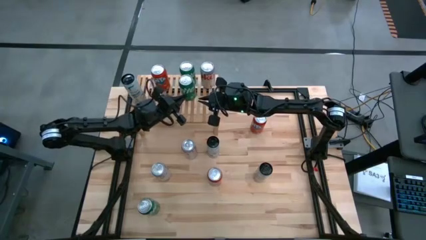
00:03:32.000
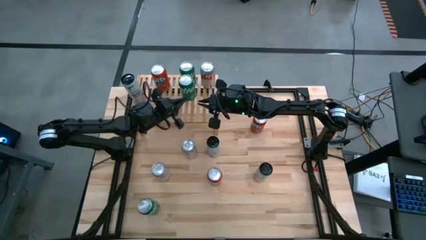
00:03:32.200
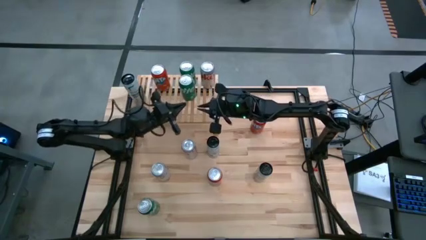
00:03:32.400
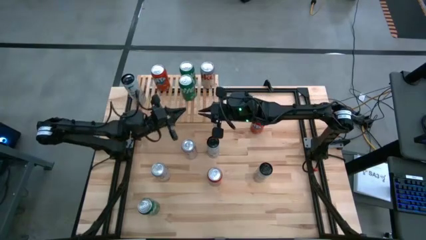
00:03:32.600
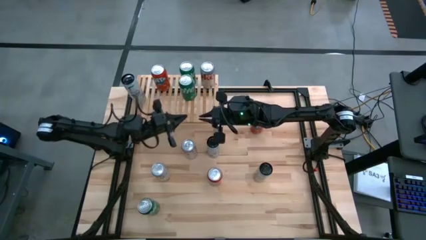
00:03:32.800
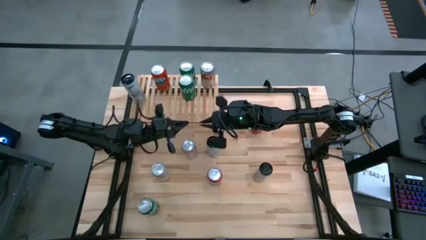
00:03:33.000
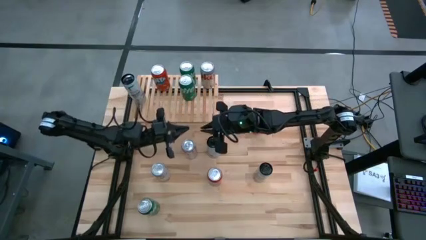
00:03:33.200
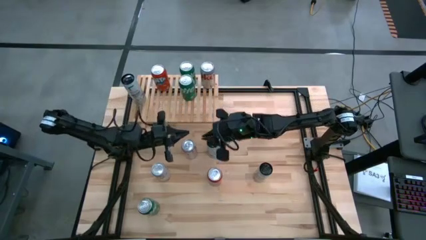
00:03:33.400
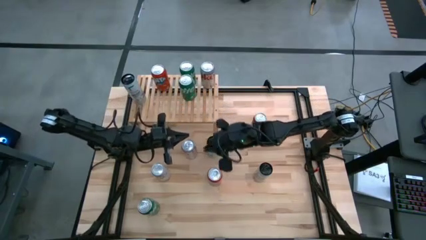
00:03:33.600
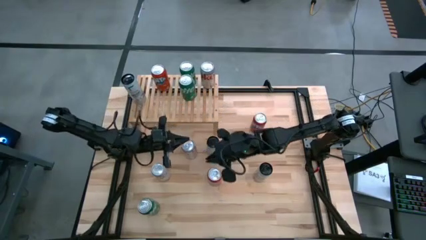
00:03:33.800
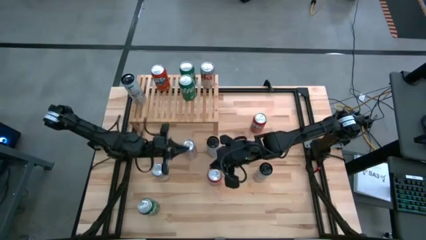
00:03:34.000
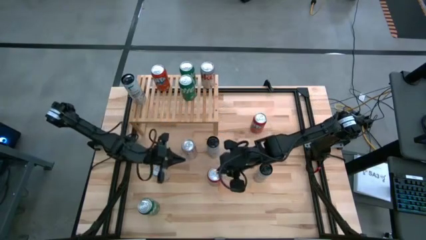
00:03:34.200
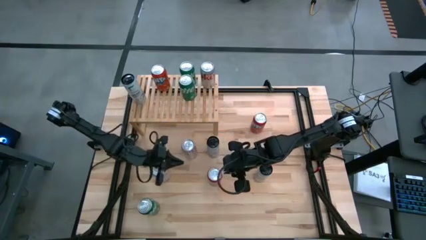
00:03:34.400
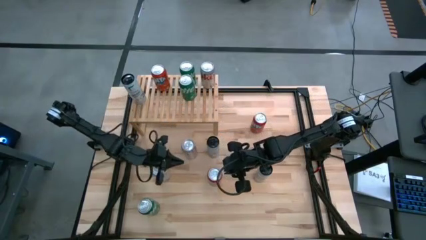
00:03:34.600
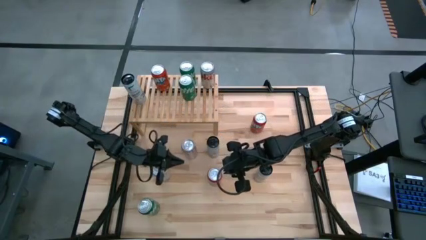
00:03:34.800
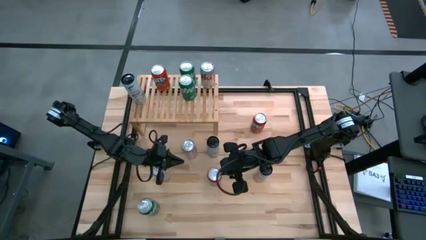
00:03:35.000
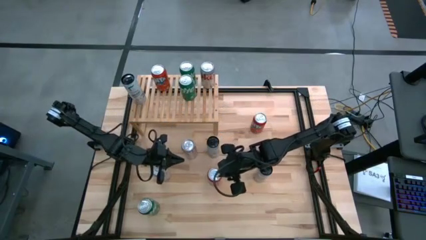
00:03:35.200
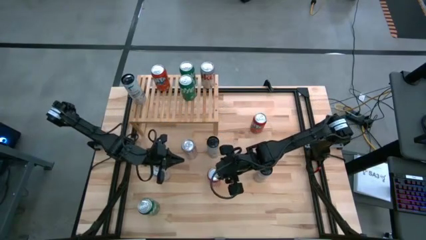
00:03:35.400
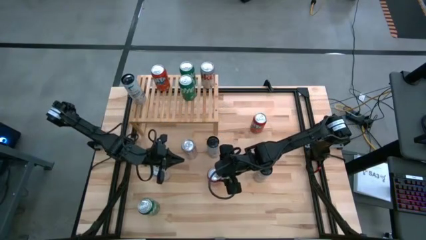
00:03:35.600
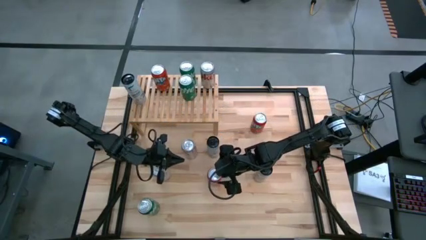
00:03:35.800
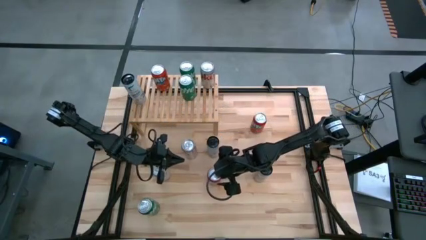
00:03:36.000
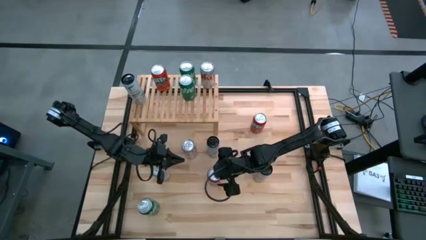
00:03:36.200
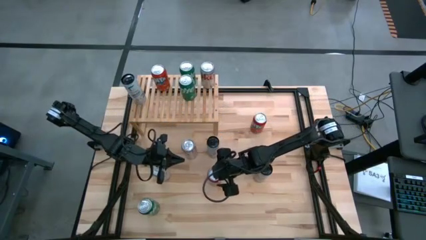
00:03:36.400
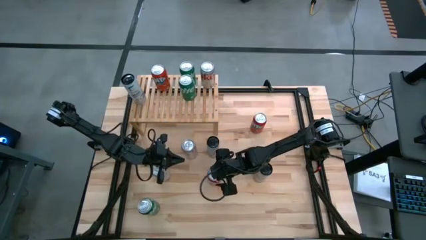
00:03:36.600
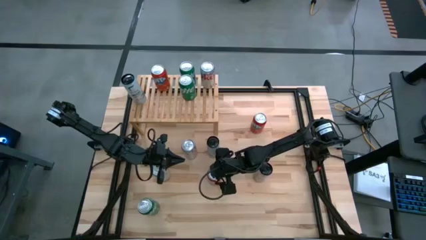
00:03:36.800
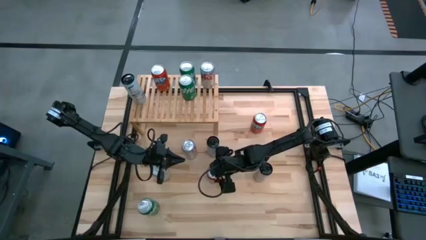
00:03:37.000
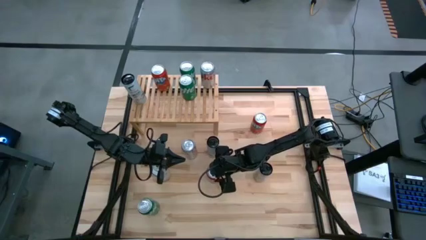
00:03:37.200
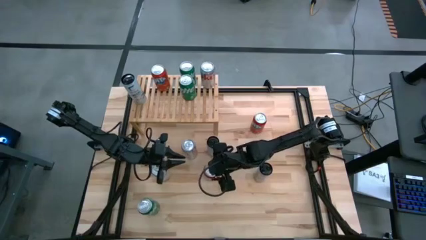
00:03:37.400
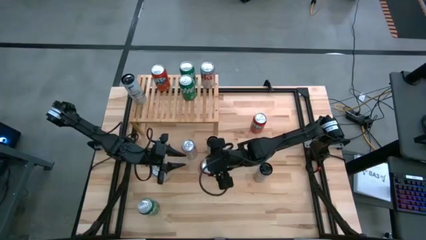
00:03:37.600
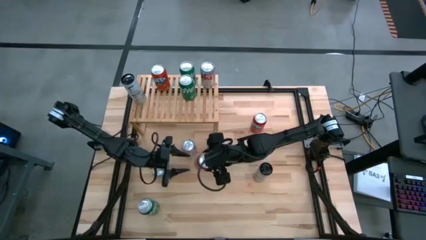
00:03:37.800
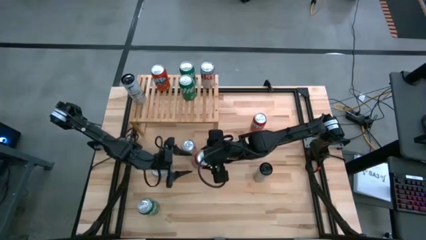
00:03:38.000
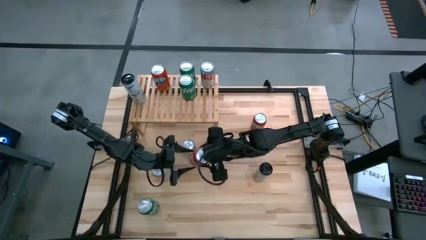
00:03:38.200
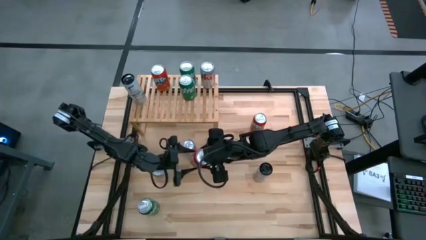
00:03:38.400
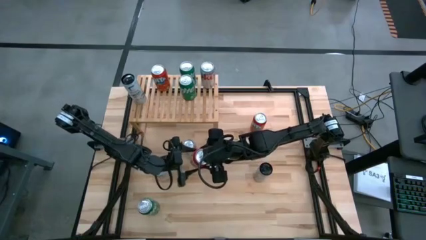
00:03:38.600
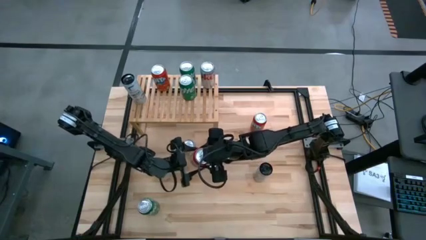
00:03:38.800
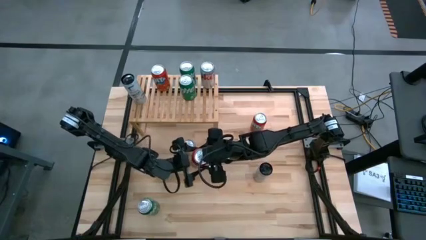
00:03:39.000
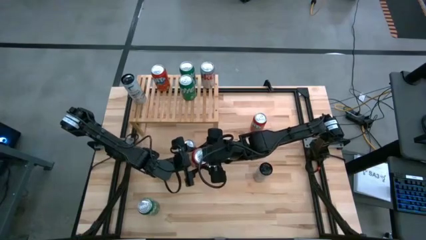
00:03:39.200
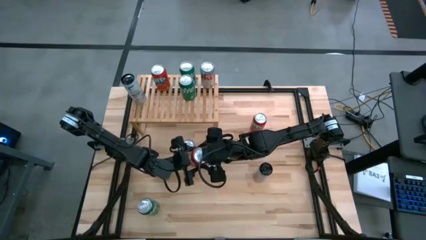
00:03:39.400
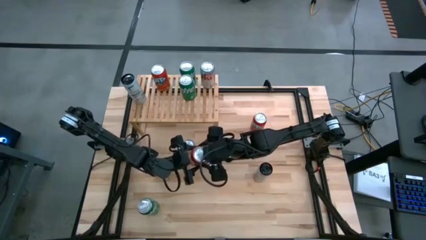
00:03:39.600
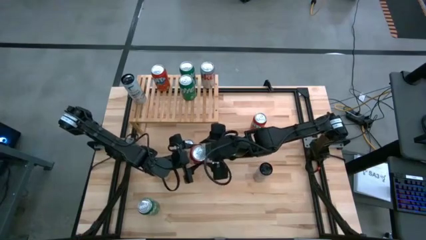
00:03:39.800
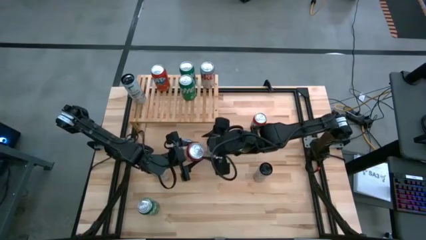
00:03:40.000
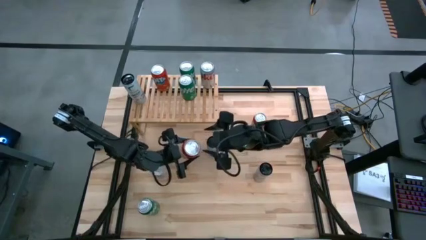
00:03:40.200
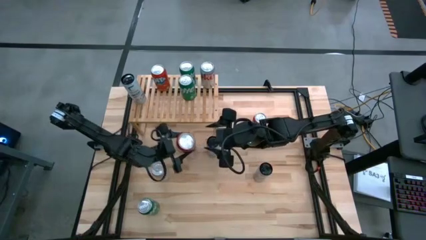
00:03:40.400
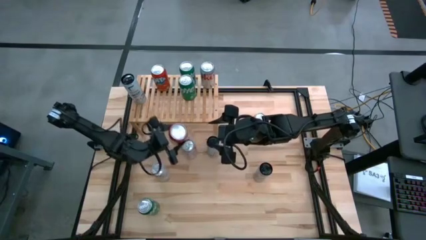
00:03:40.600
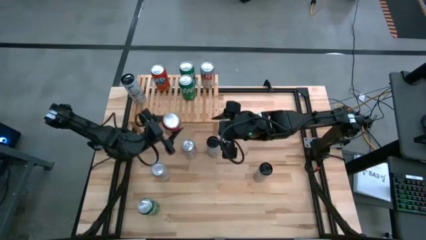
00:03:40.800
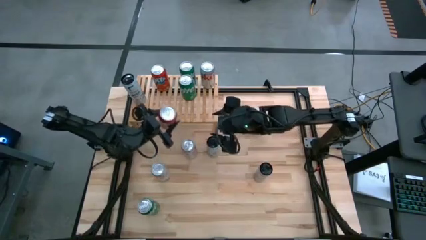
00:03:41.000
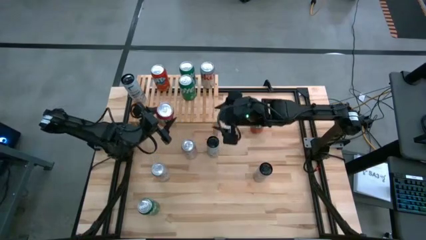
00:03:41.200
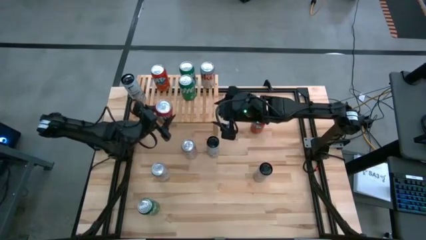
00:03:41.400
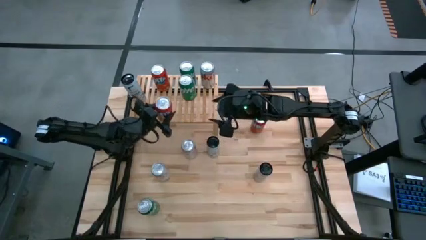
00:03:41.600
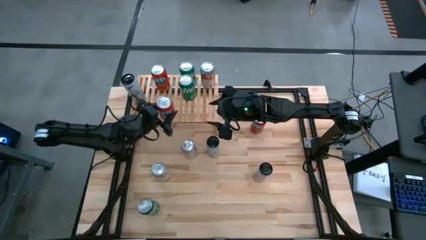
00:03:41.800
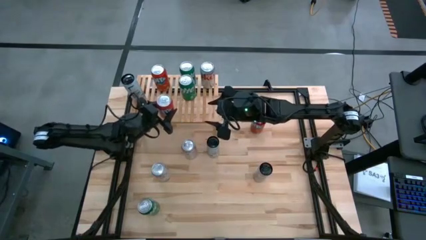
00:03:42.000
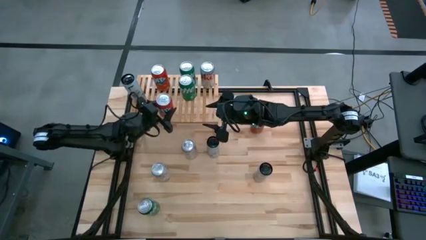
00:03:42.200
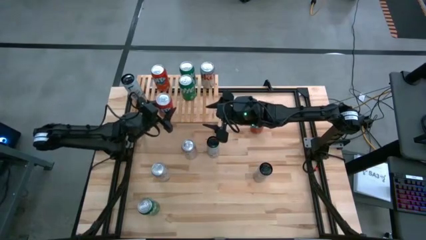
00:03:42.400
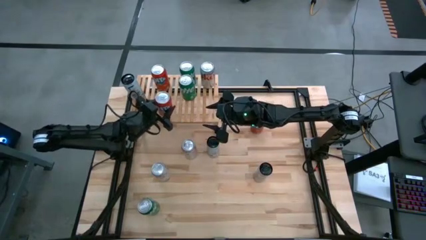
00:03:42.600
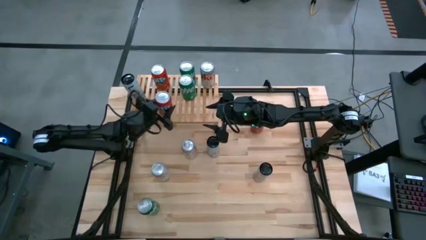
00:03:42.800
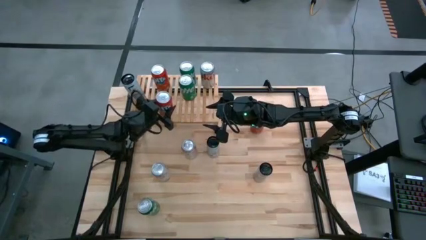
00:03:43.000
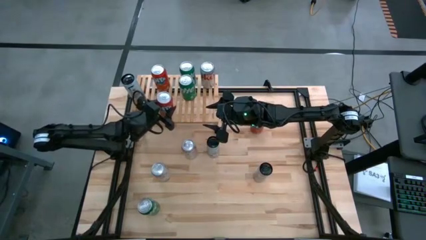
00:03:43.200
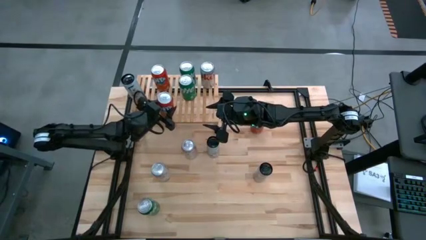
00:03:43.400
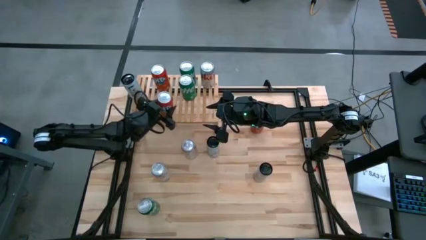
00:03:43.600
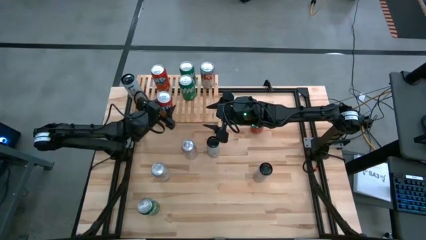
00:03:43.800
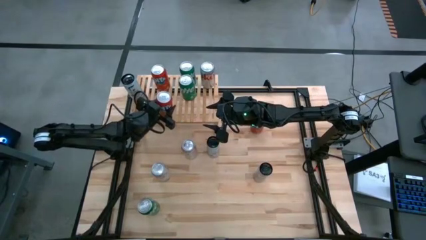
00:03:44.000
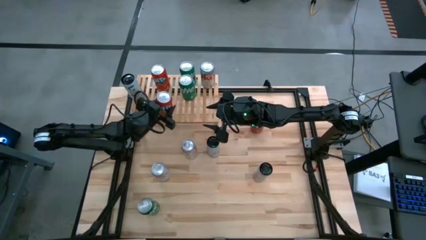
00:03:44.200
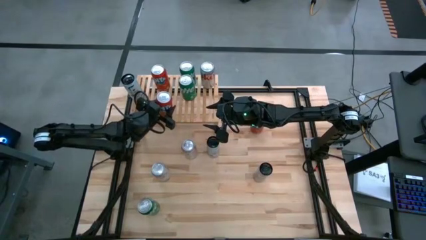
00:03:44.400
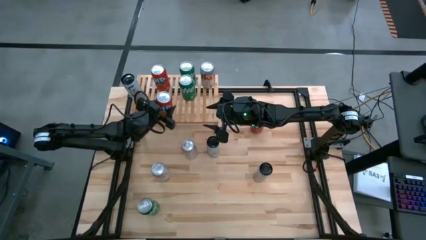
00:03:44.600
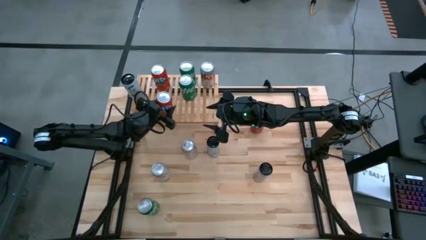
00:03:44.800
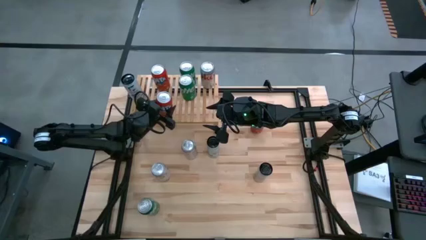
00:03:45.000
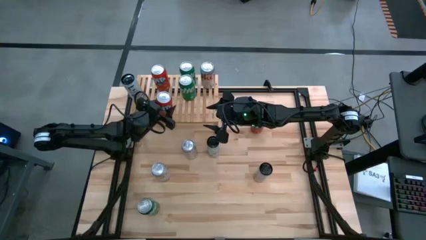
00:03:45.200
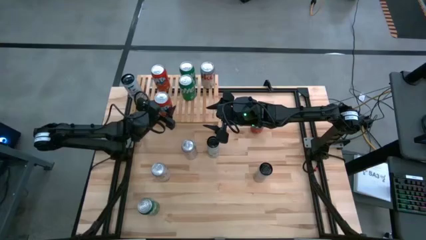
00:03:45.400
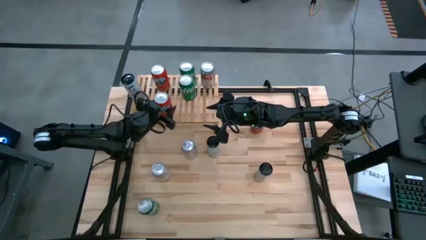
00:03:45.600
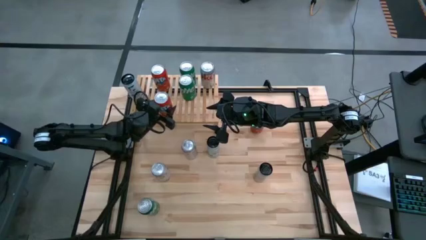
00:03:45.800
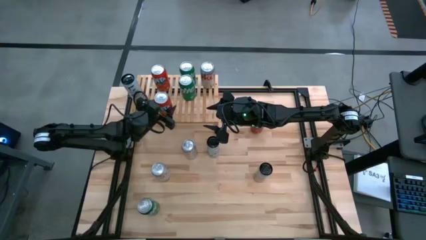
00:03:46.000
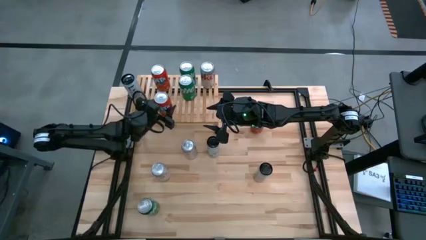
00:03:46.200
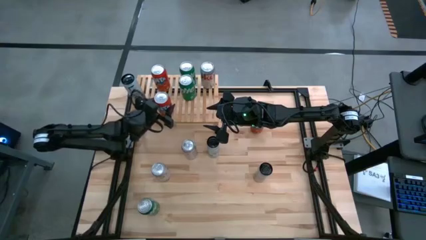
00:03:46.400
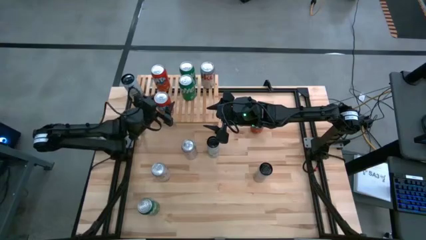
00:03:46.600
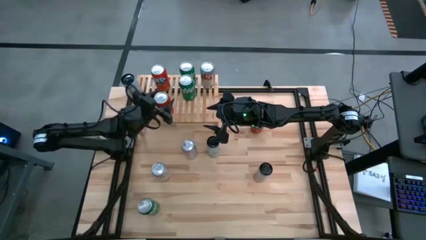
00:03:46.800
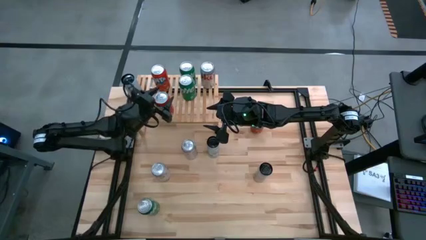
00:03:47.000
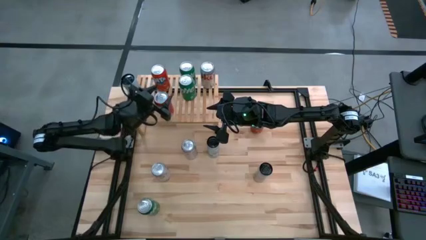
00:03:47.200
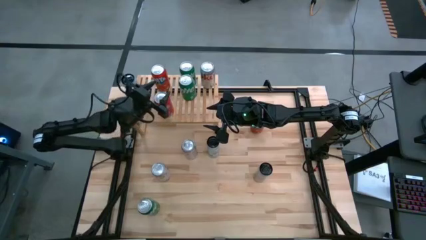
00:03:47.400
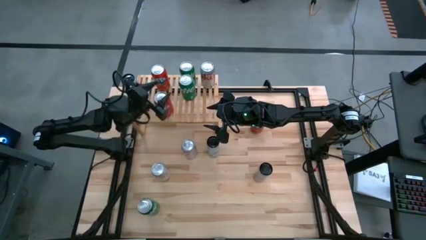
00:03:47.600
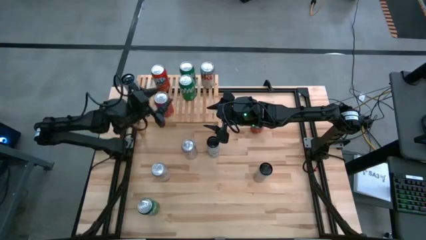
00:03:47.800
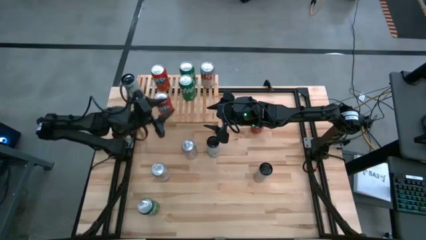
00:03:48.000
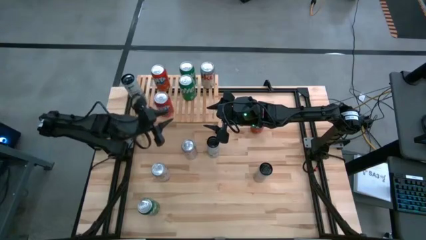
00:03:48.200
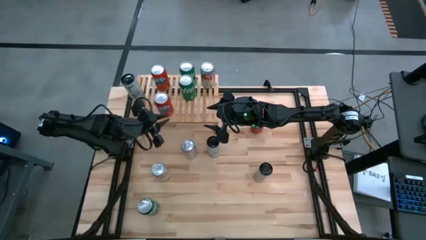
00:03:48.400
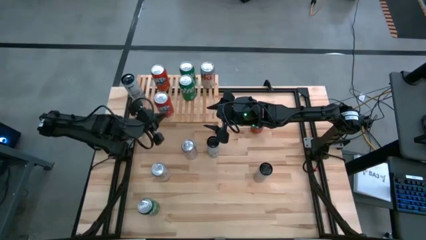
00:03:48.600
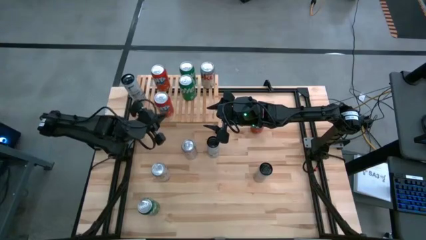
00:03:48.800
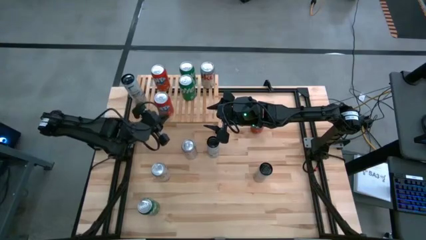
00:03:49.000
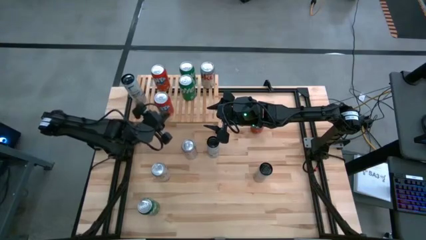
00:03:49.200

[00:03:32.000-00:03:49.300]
Task: Place canned beverage on shelf
Put the bottom orange soda can on the shelf aligned with the other orange soda can
